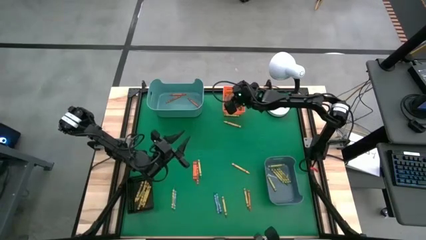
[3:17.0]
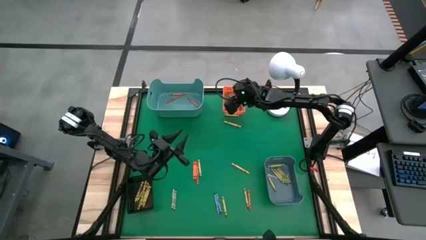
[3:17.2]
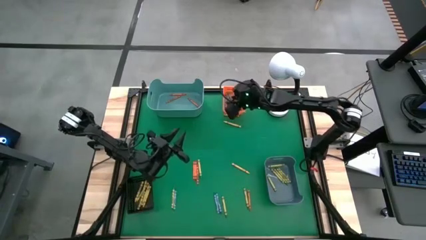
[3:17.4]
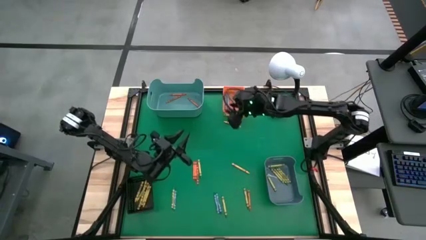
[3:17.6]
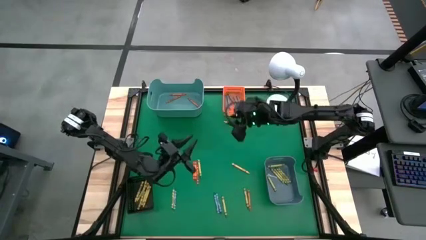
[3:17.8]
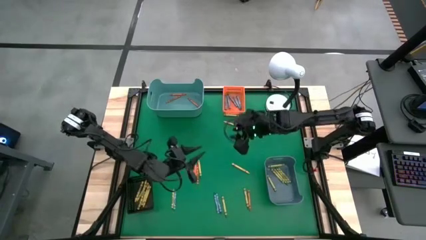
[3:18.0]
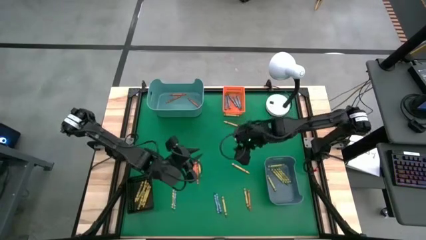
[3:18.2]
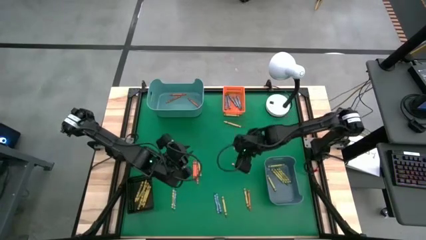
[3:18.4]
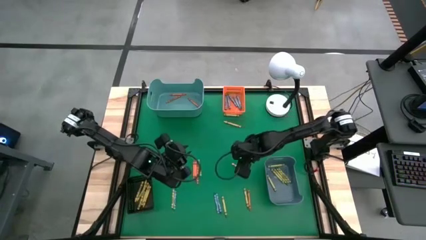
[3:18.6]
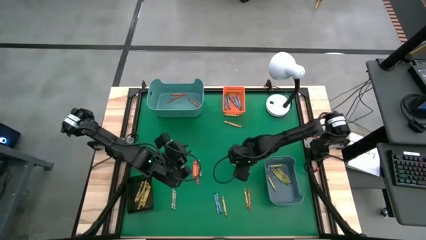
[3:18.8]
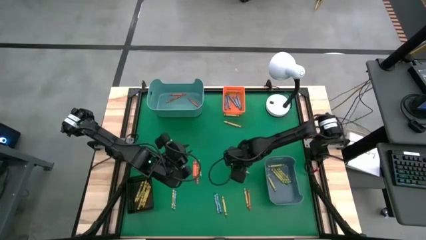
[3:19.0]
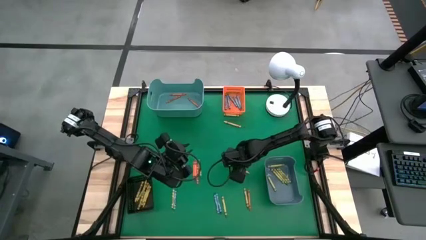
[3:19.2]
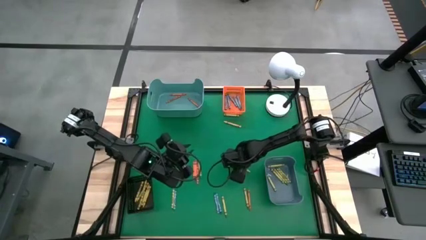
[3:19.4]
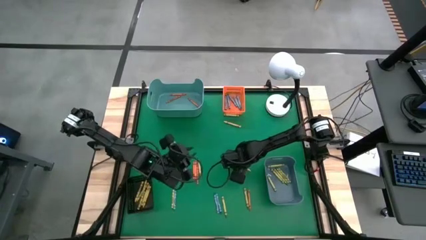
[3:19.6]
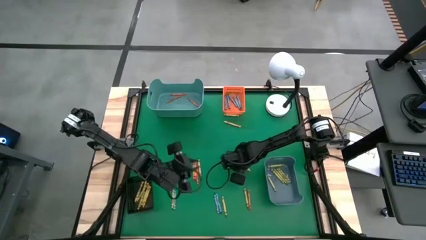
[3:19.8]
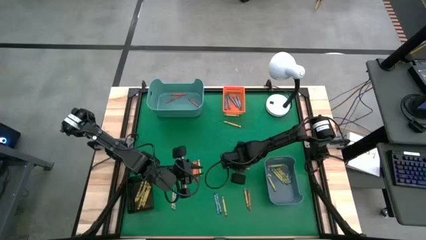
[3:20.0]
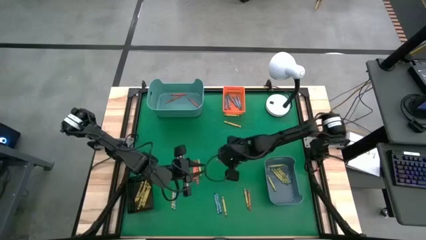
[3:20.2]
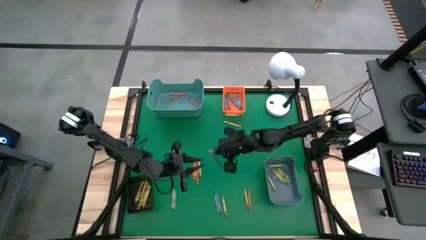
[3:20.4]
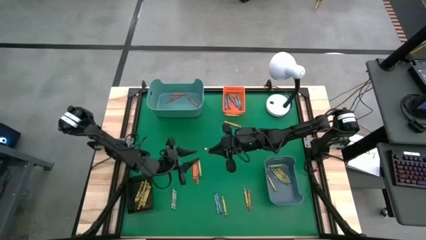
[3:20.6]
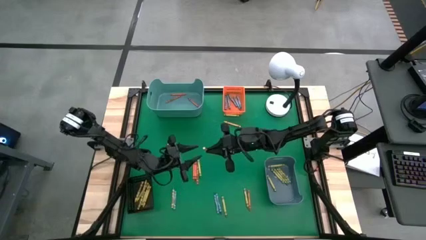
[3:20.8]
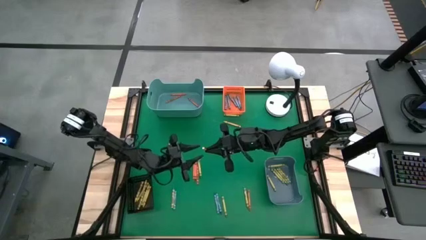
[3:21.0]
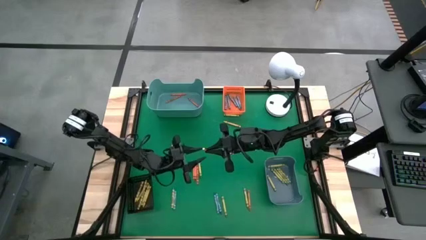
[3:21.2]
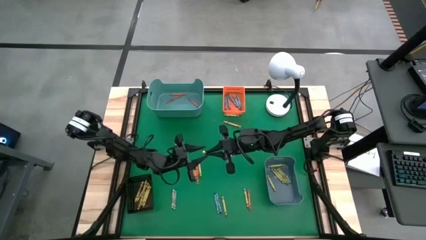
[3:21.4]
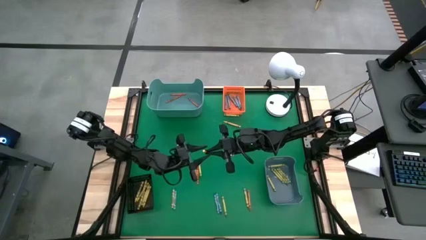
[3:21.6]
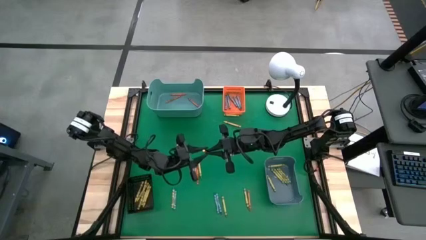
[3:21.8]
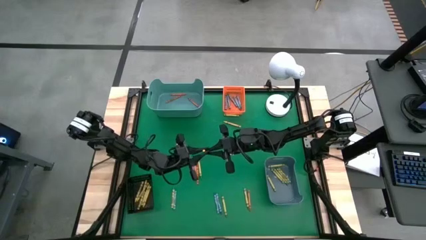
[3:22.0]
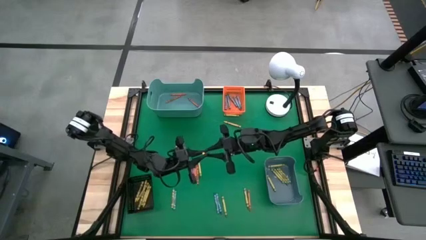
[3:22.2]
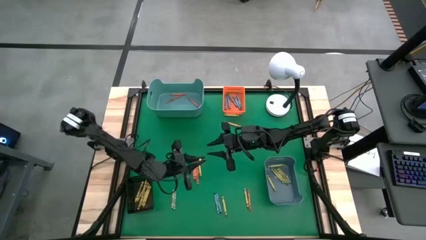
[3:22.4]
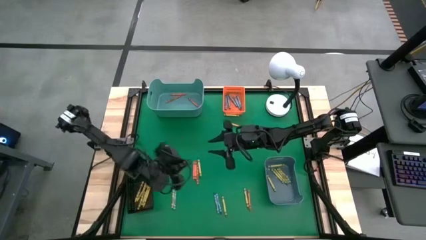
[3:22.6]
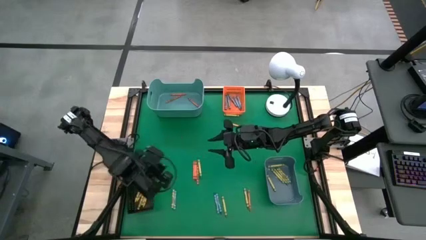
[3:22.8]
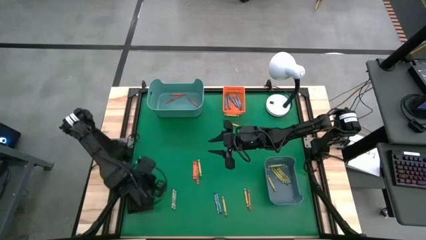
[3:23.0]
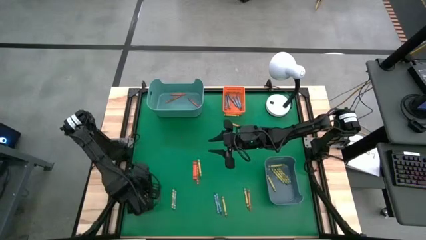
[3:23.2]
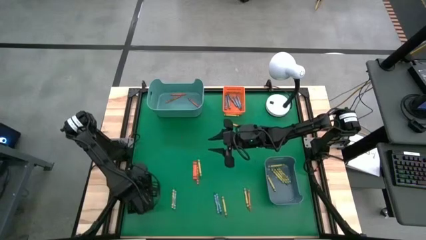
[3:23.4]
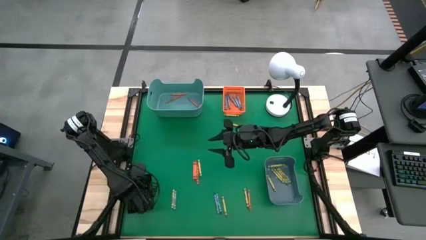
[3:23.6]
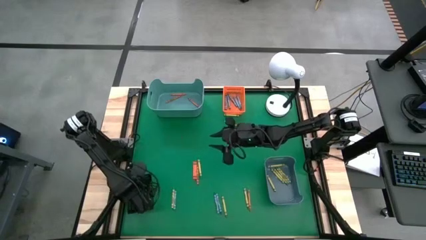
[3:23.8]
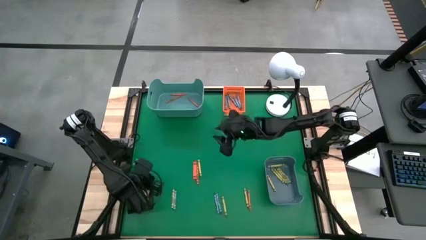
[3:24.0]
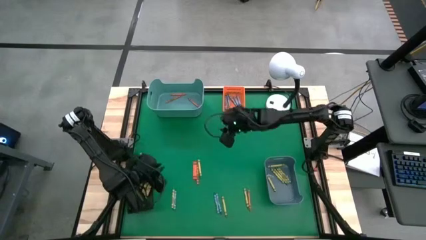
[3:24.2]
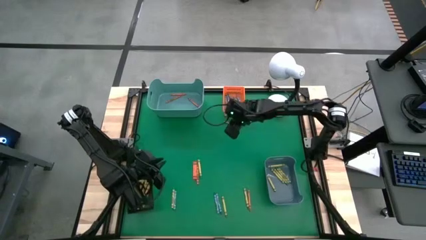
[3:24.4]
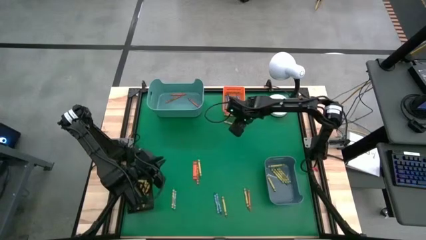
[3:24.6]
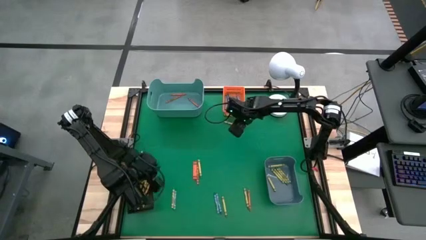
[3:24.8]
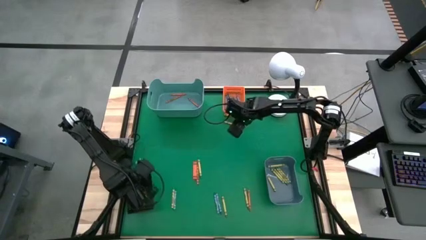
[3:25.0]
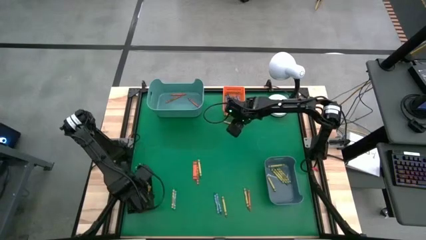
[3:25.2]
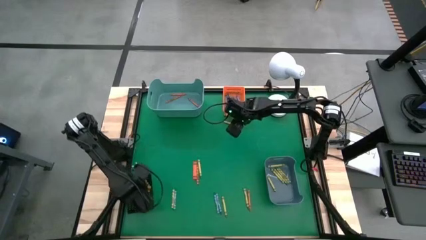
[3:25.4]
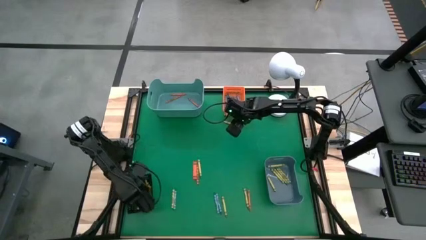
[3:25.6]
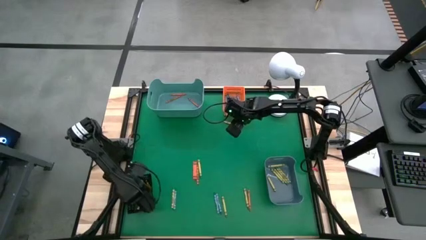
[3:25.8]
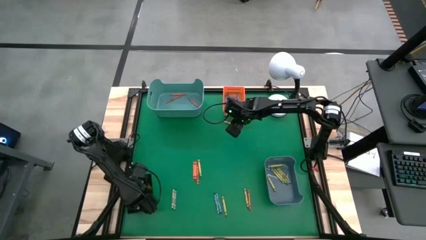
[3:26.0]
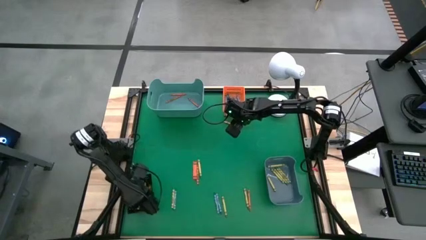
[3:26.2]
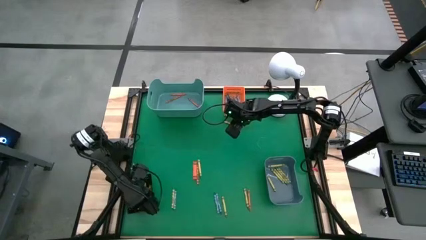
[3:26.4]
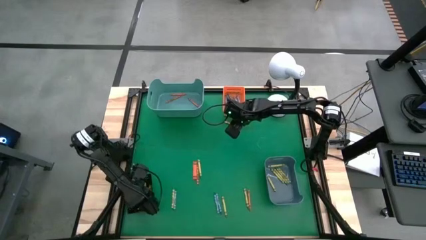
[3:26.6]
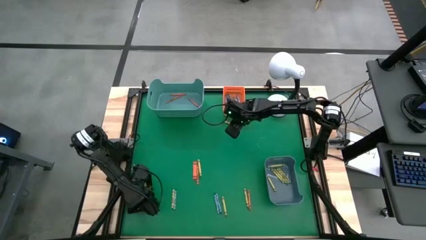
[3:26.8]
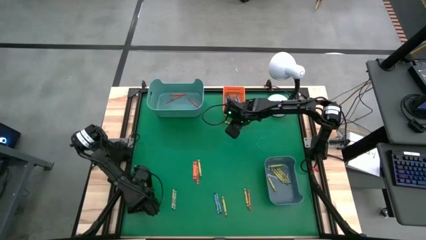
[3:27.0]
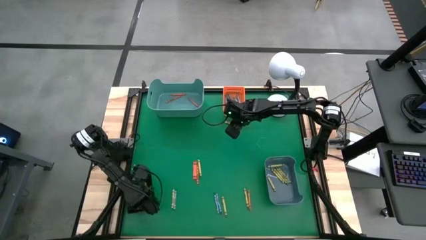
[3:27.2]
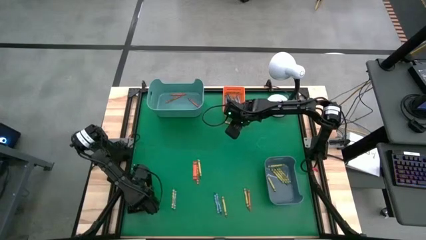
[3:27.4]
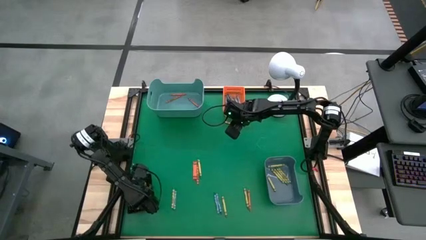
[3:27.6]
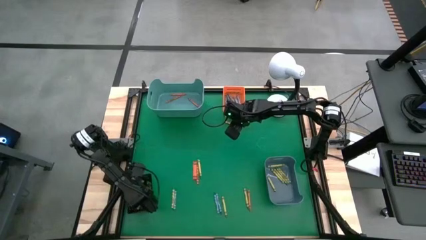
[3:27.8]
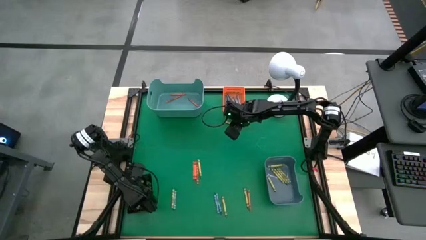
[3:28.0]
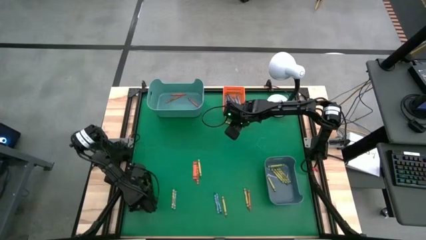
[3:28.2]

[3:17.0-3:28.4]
Task: Sort crayons
Put the yellow crayon into the black bin

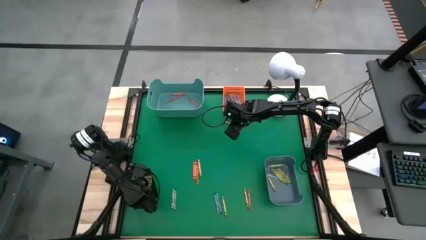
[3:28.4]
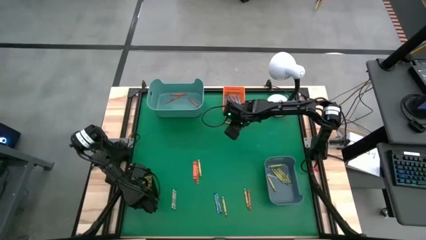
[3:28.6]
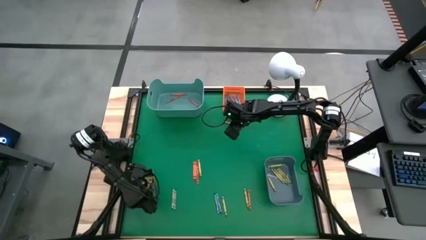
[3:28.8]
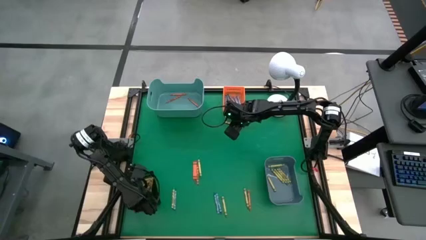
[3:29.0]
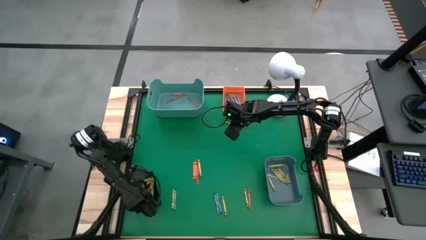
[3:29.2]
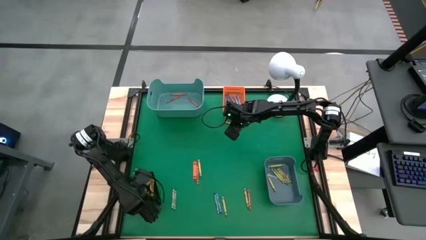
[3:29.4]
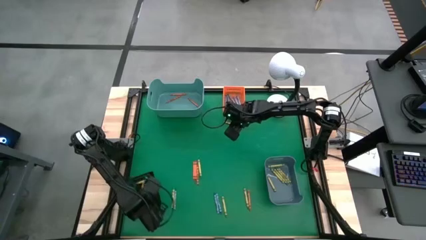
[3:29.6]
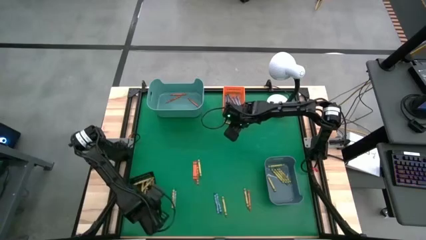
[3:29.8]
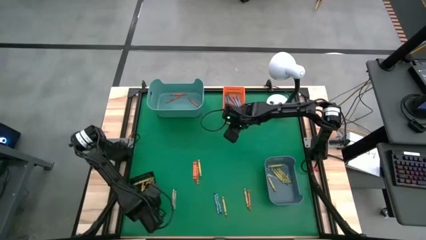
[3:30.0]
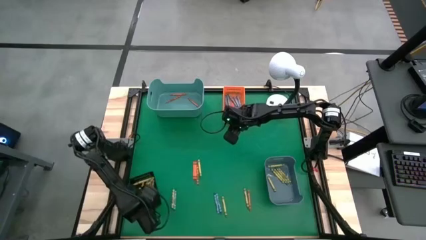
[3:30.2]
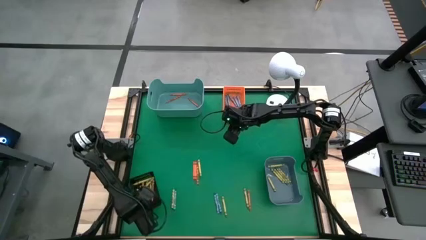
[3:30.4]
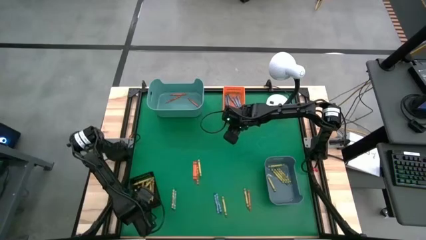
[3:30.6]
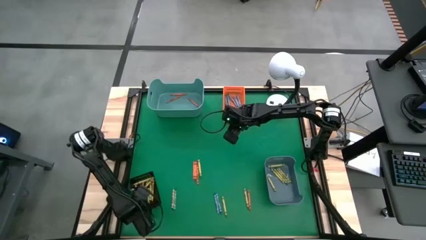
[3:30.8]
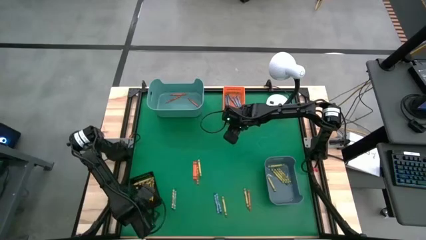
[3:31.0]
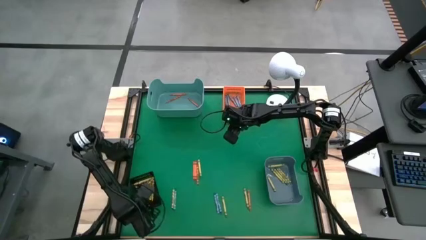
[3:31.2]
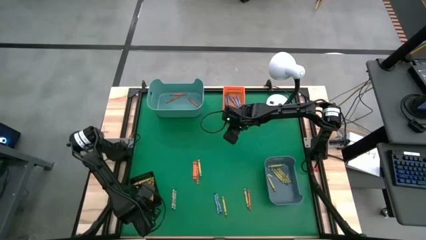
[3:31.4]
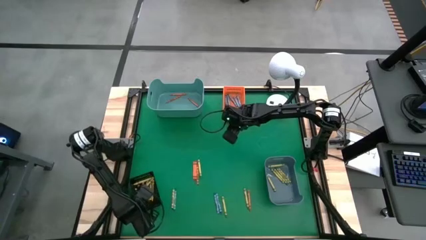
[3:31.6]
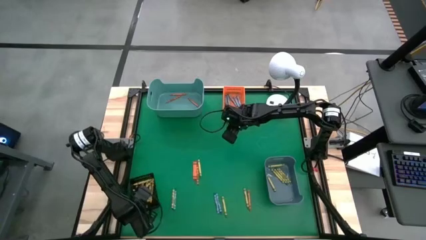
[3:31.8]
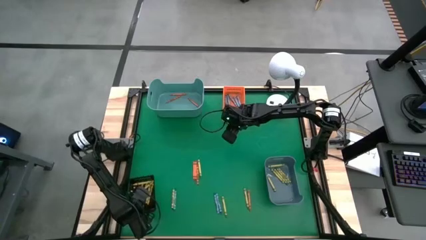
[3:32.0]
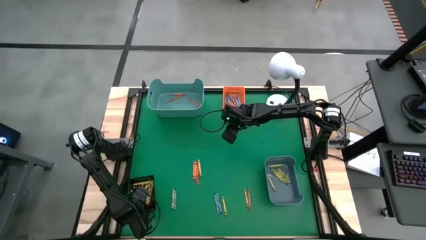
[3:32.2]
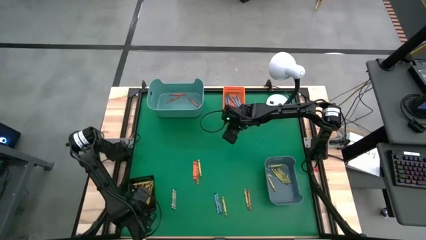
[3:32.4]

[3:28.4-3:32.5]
Adjust the black bin
